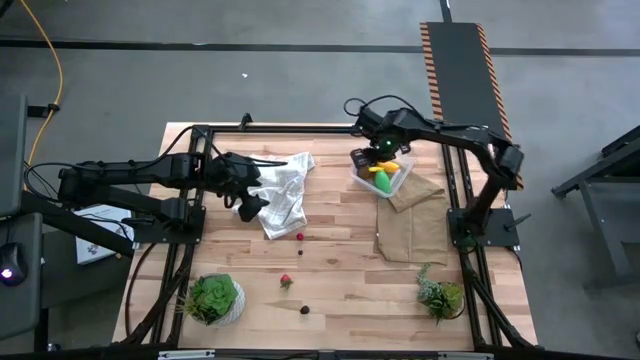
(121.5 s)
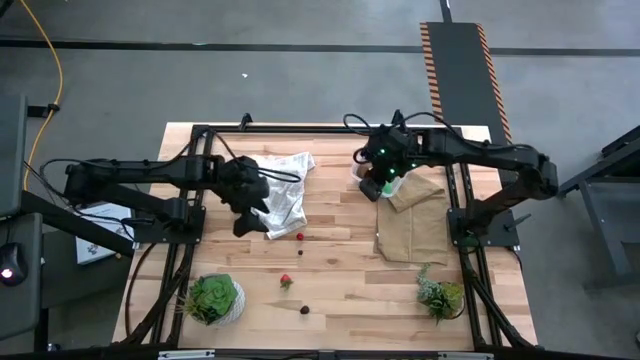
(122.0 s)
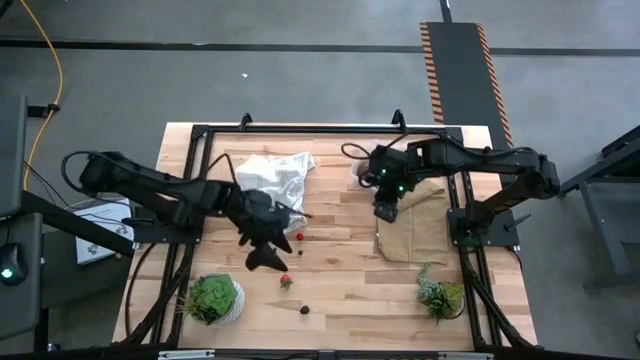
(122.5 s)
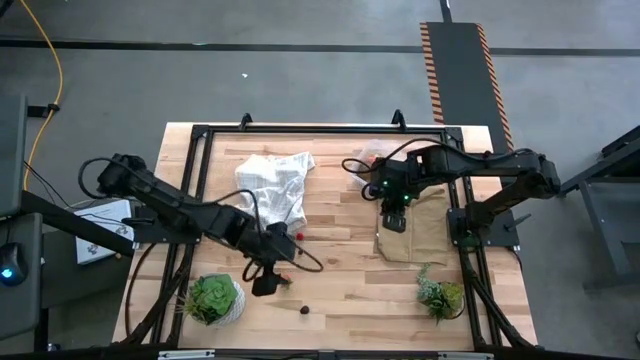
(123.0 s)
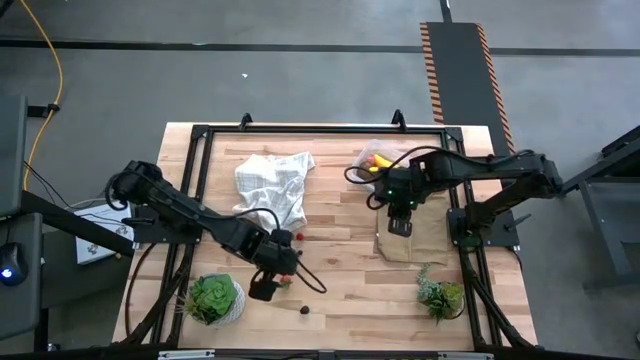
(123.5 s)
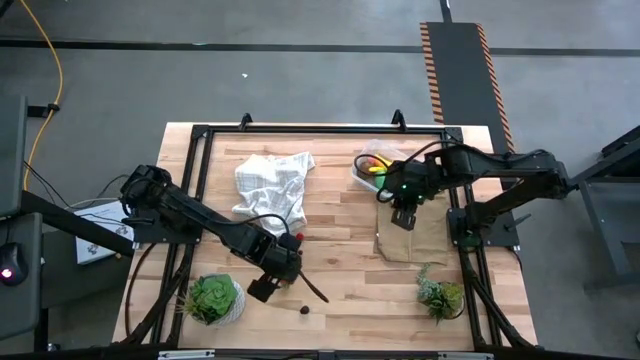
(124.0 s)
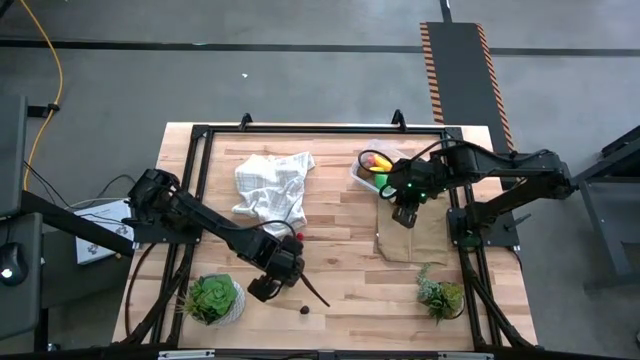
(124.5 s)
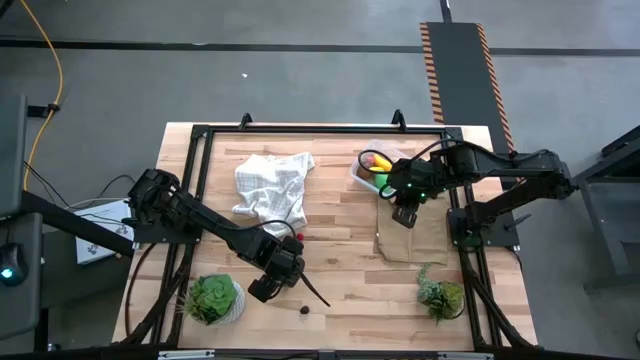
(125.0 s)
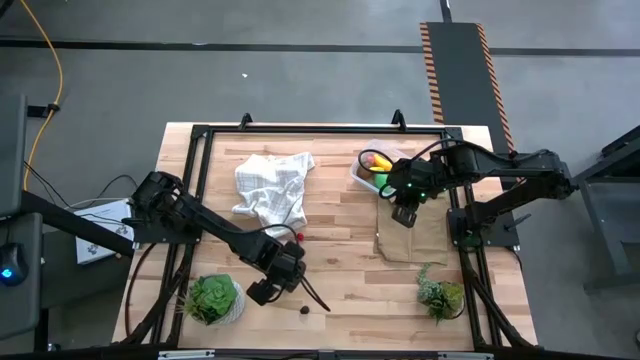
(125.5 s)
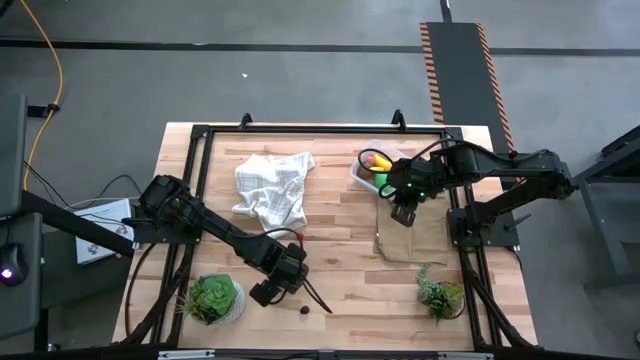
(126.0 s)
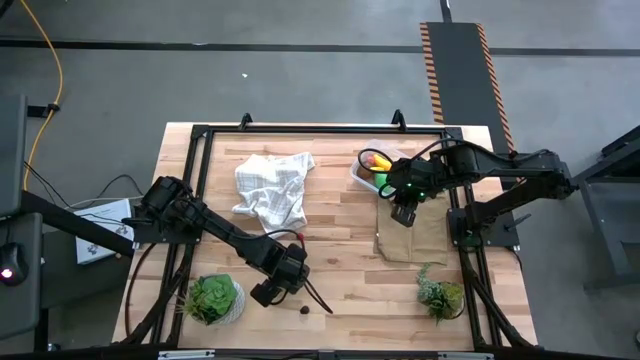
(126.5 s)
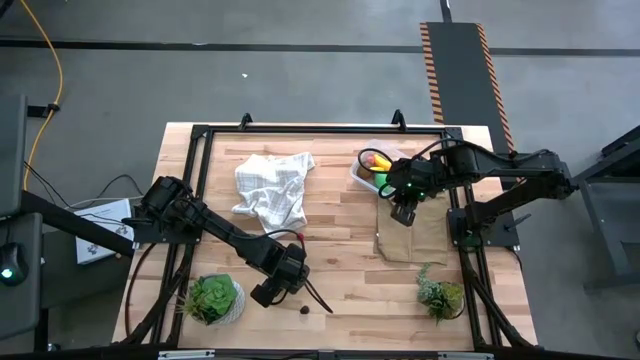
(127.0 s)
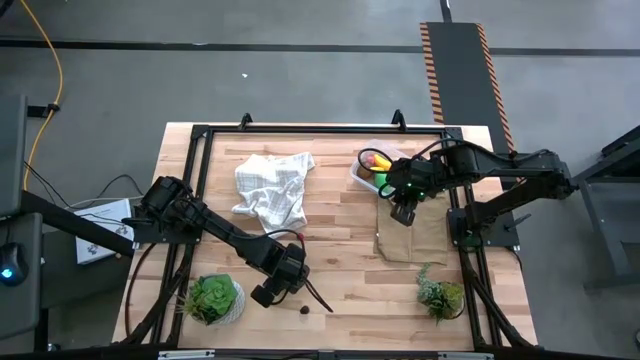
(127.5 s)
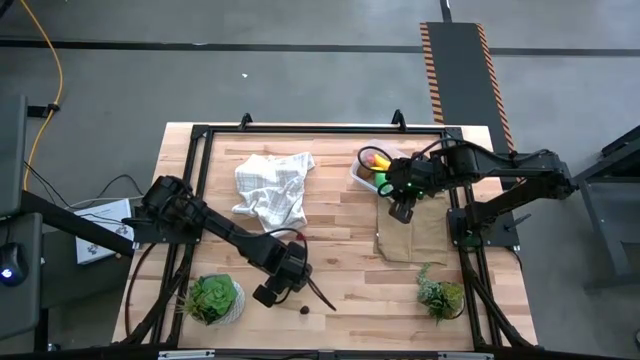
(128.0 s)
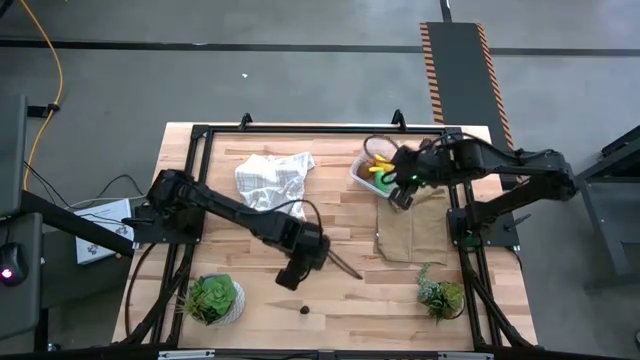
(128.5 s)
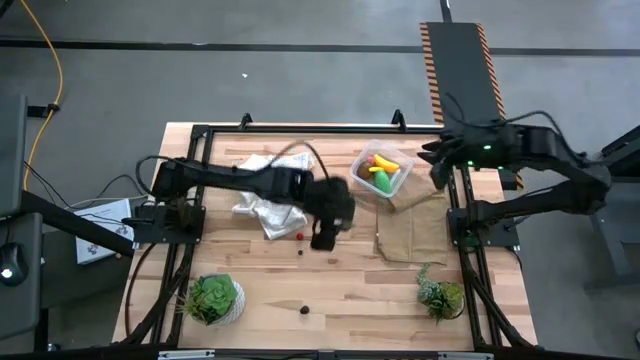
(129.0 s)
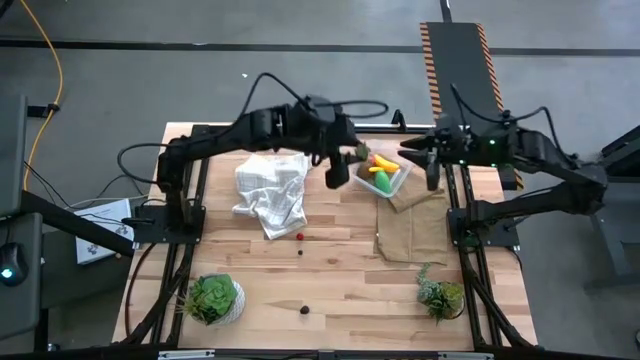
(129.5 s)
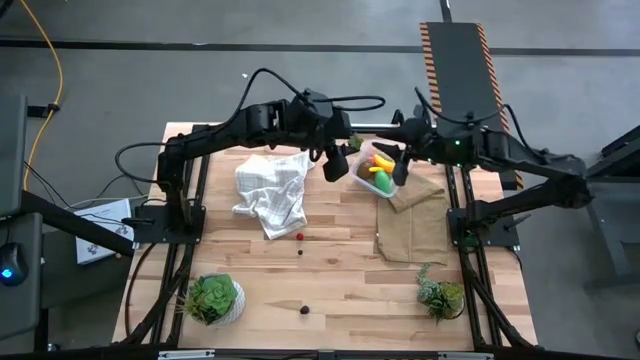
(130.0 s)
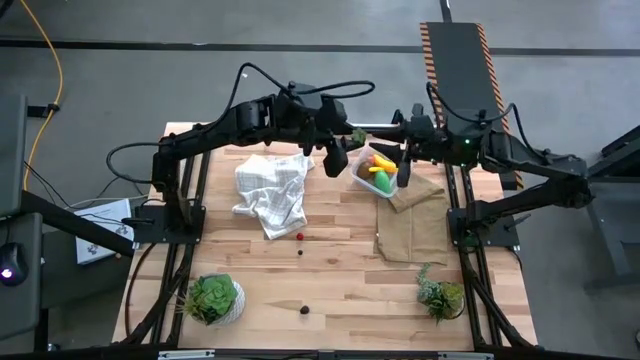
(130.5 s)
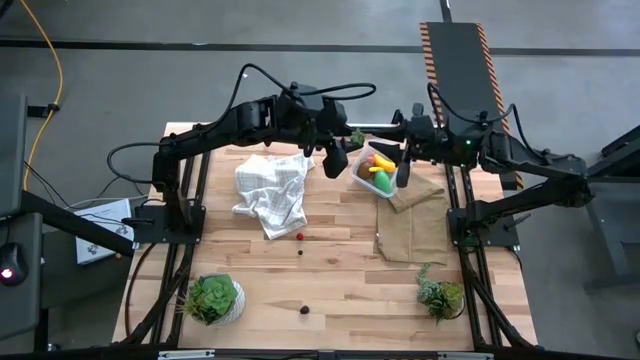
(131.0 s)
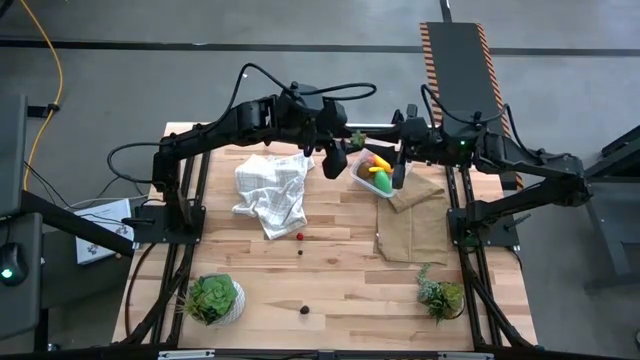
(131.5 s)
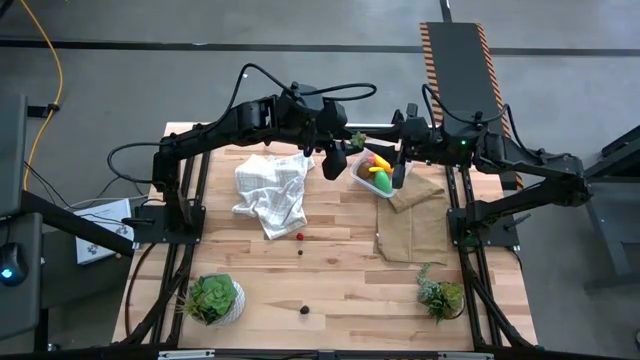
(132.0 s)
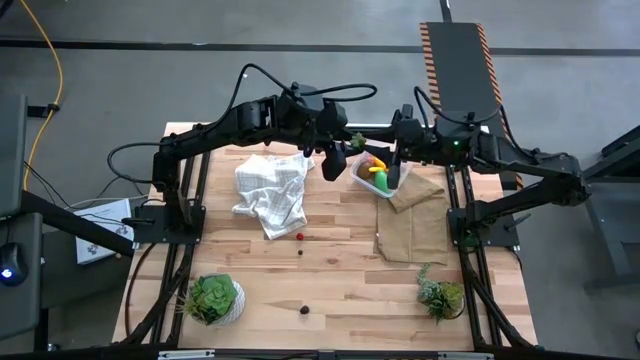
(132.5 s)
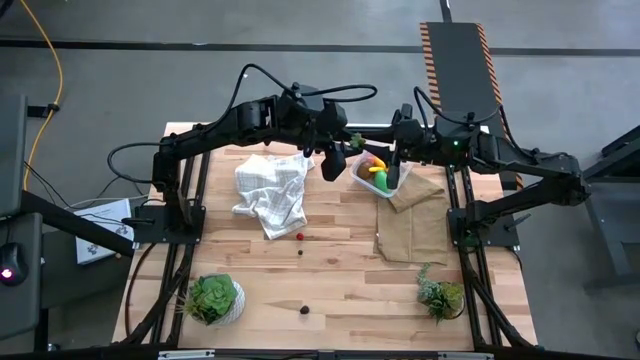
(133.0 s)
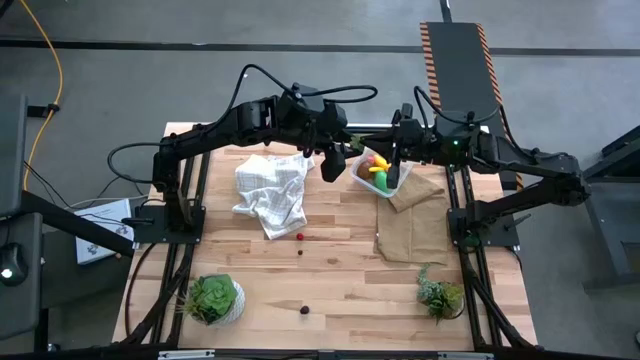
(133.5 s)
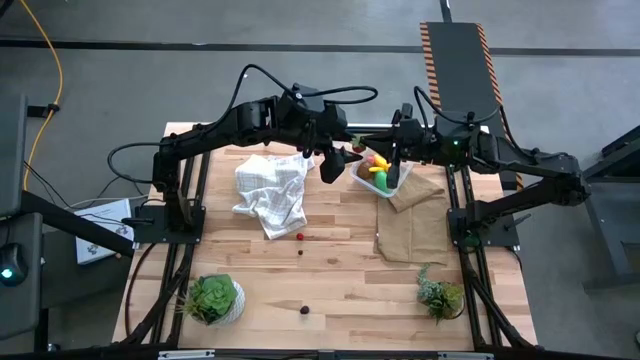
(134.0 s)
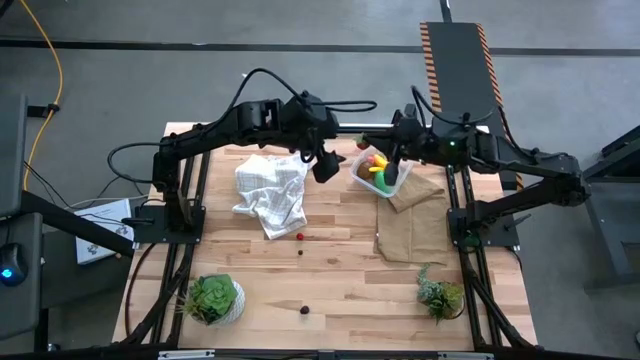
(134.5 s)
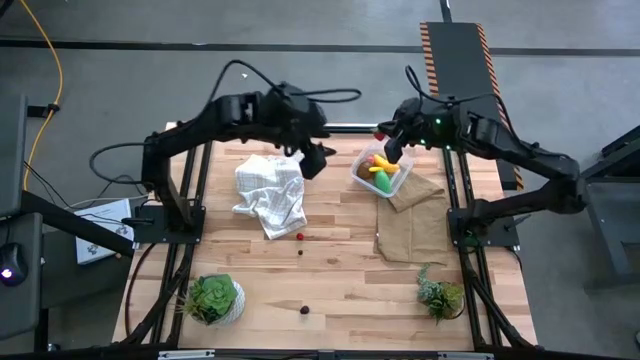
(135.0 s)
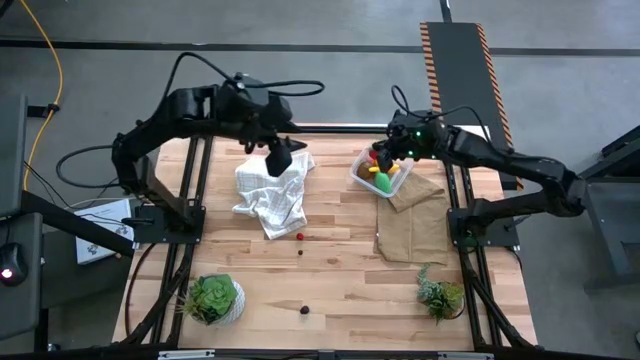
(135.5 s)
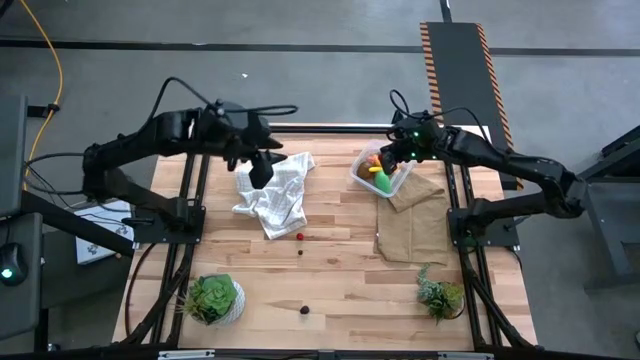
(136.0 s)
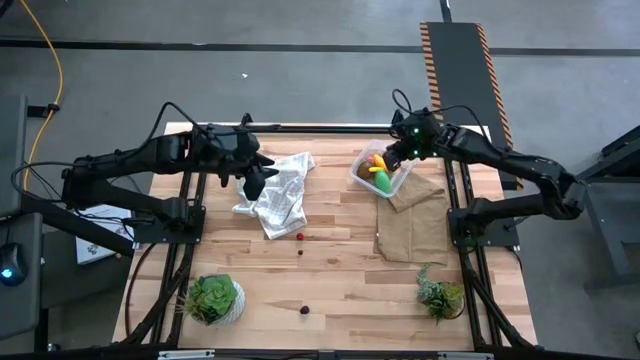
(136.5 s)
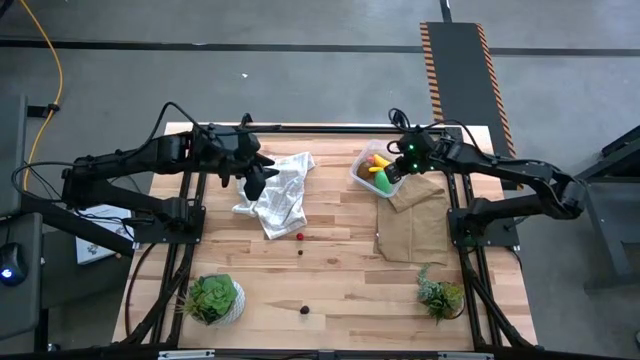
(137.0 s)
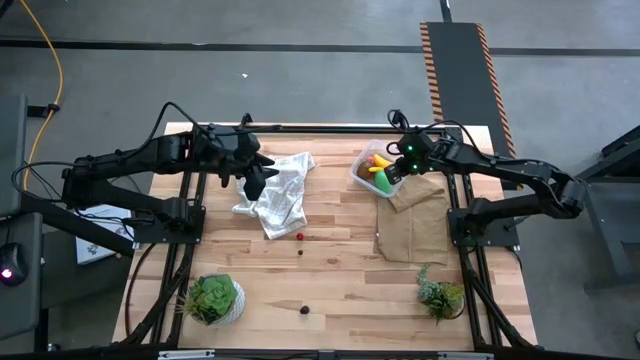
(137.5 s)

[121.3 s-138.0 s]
Task: Pick and placing Produce into tupperware
Put the red strawberry into the transparent bin
